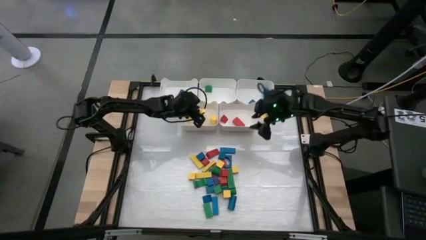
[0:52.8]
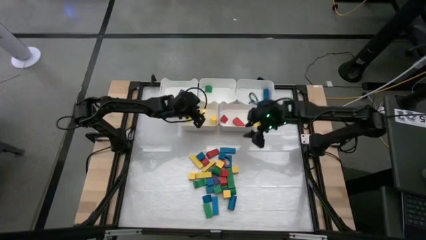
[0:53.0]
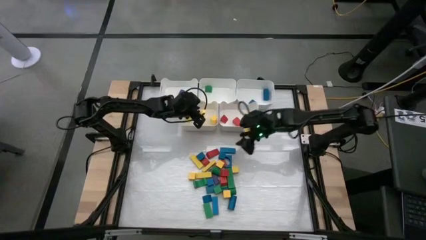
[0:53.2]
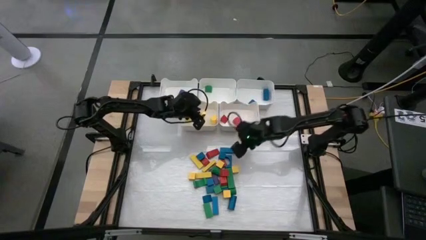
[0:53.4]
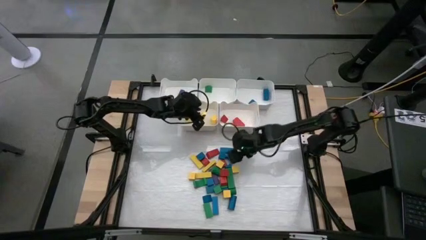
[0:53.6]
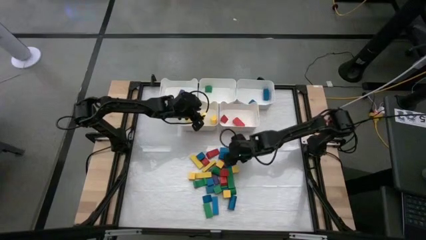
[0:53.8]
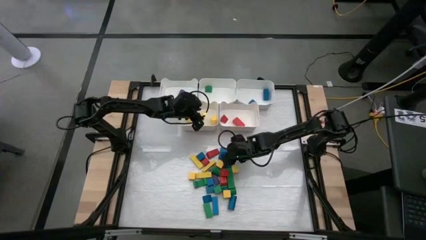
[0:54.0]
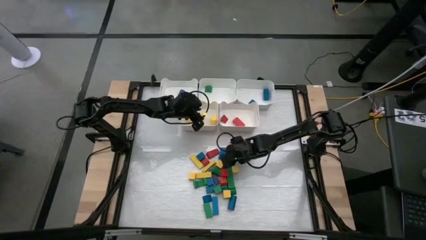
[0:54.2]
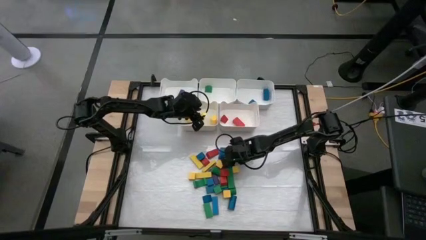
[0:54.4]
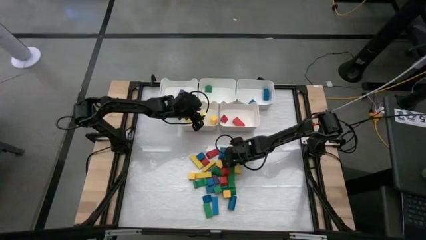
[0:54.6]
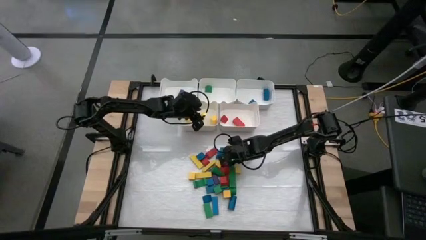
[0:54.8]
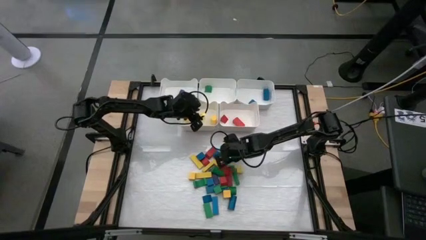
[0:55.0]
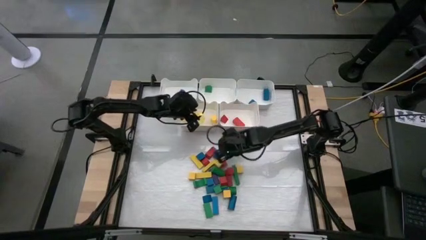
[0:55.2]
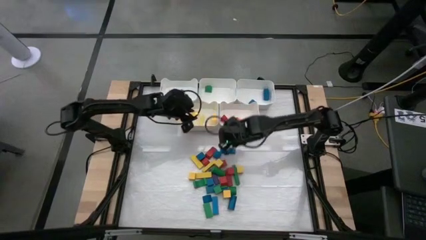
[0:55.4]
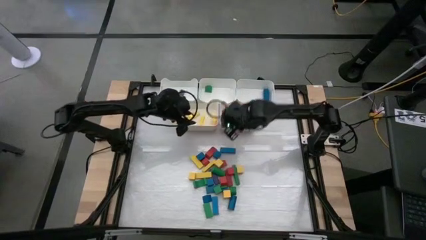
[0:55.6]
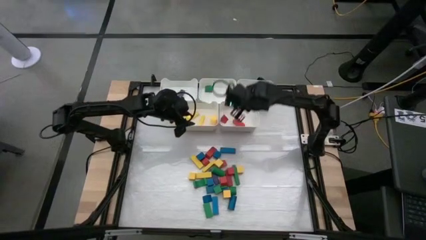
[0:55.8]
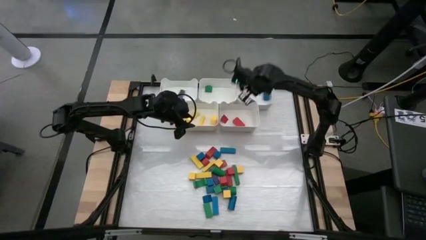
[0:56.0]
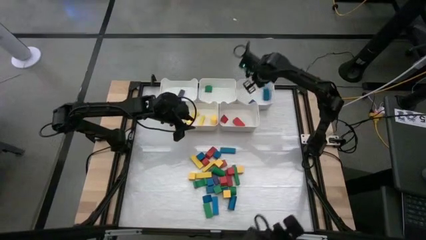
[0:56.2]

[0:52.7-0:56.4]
Task: Sort blocks
Put the blue block into the top right bin

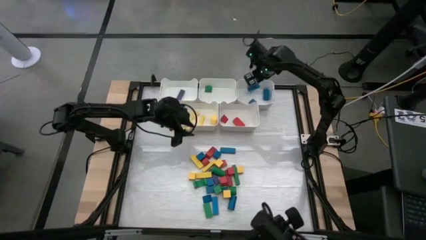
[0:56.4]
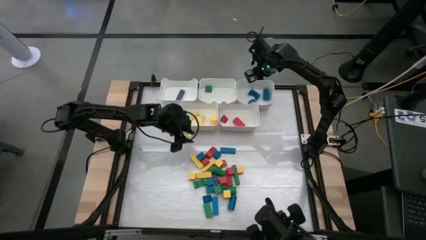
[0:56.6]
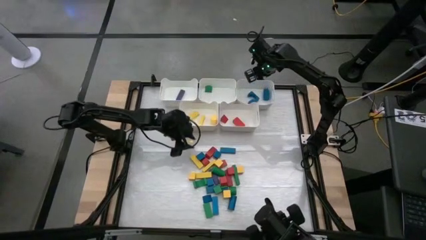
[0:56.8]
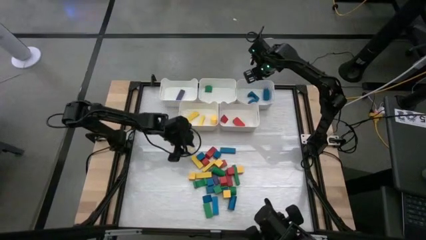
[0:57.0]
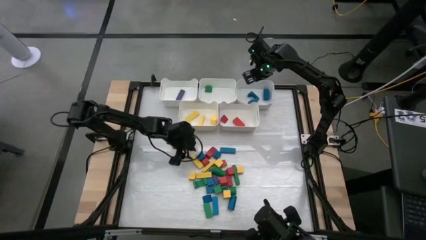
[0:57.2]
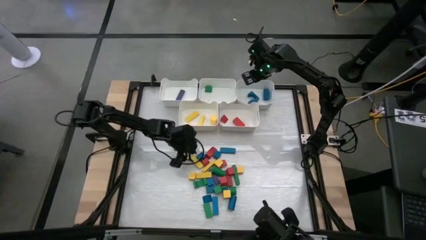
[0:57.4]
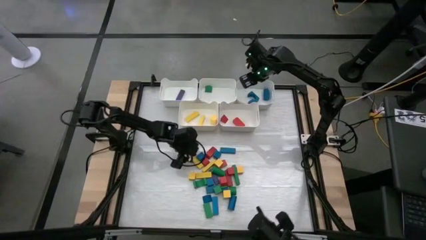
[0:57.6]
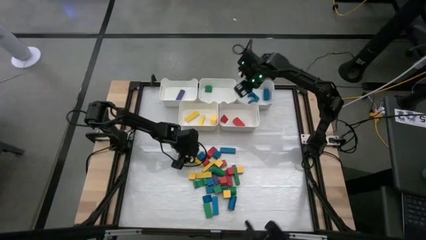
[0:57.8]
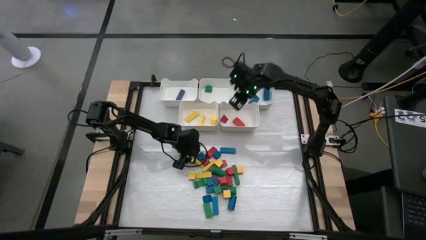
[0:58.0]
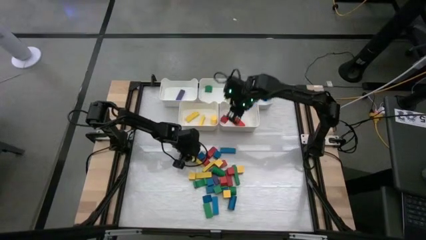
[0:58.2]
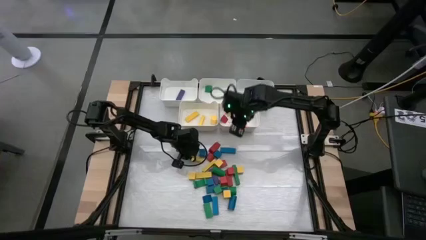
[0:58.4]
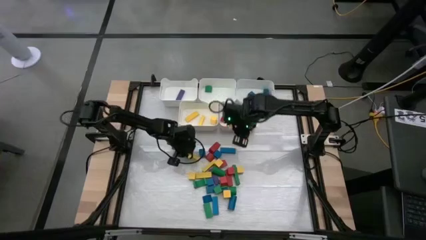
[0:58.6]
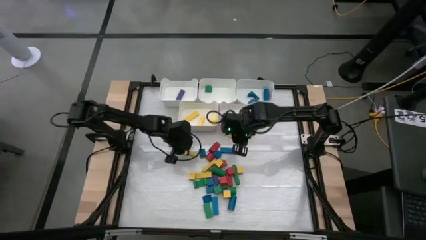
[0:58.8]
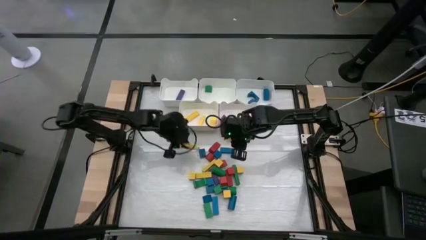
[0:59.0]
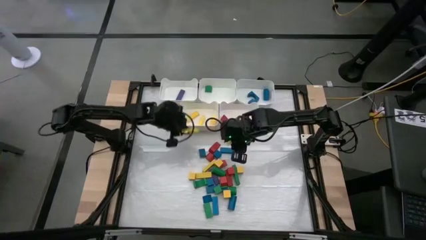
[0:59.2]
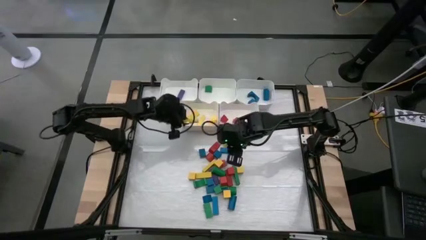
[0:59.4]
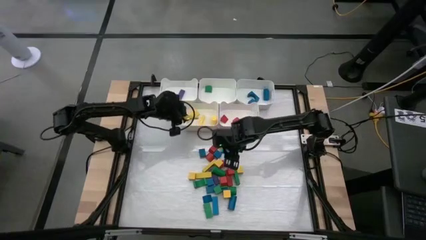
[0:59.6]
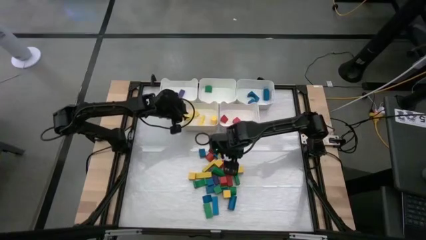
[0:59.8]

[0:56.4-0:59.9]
Put the yellow block into the bottom left bin

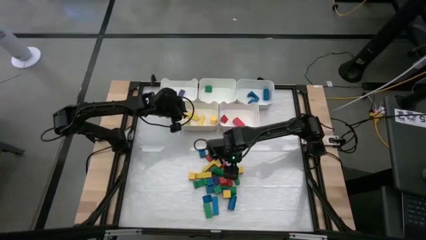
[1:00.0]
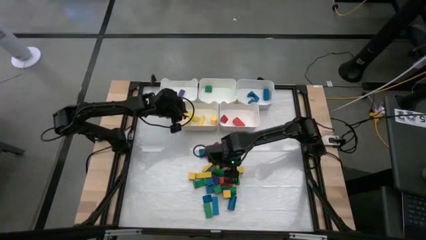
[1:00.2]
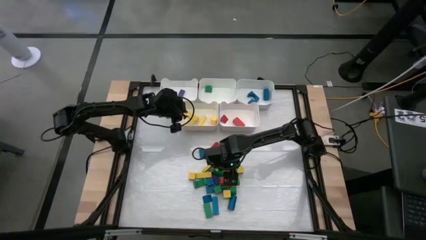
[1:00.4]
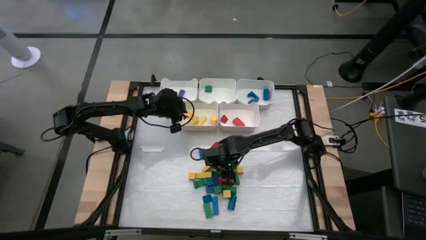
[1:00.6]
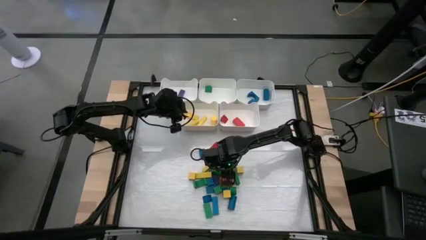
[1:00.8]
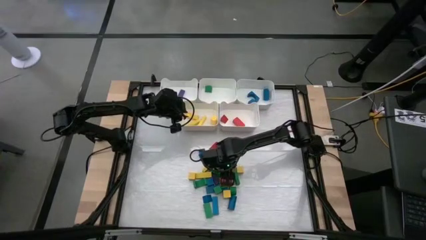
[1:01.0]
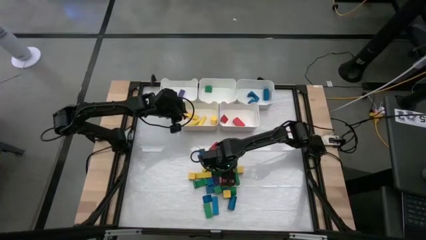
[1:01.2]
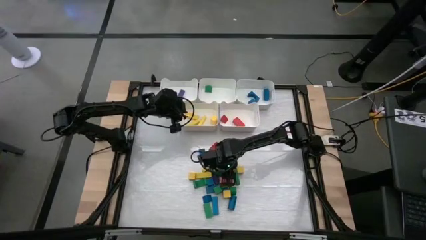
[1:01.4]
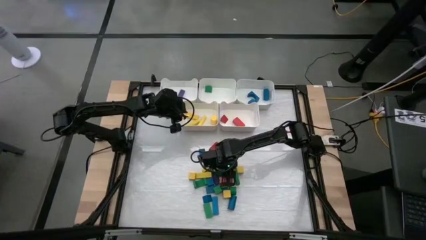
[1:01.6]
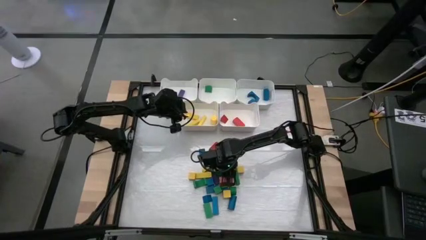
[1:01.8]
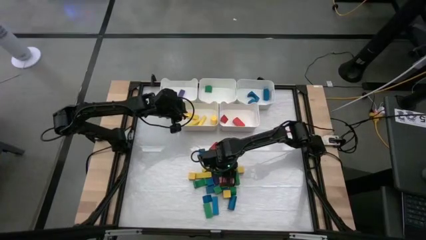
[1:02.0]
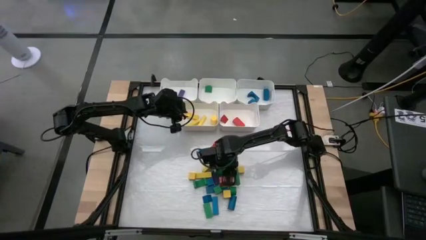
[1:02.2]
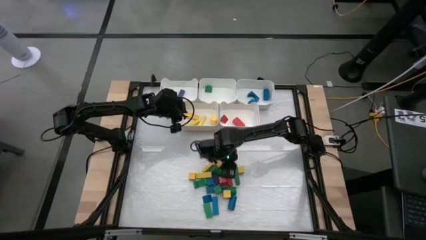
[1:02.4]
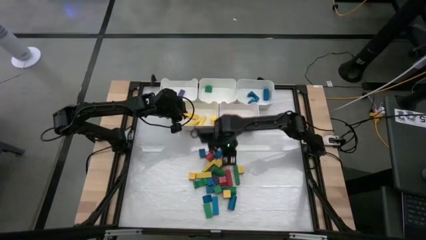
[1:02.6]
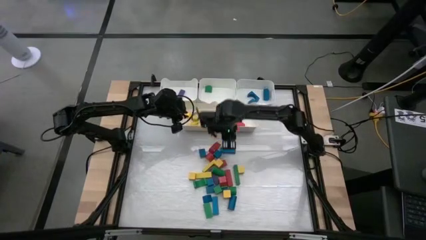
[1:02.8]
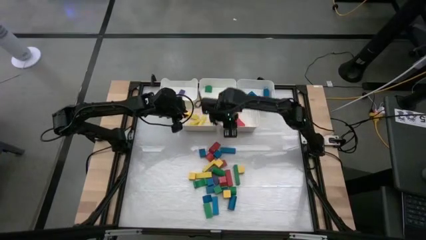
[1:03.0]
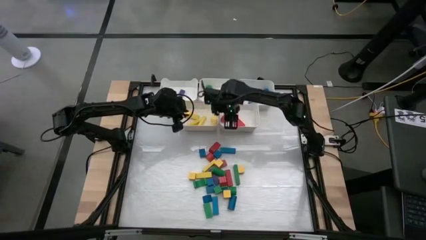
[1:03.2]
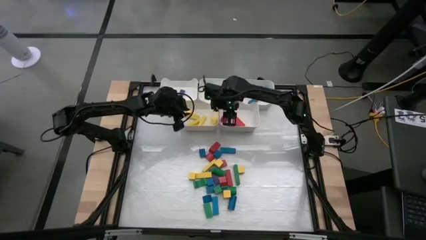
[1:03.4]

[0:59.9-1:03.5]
Put the red block into the bottom right bin

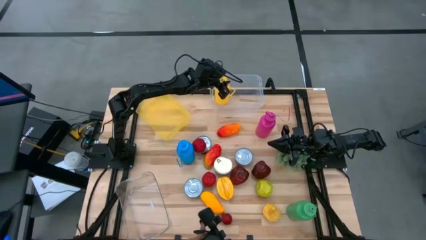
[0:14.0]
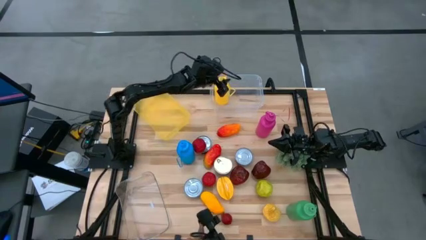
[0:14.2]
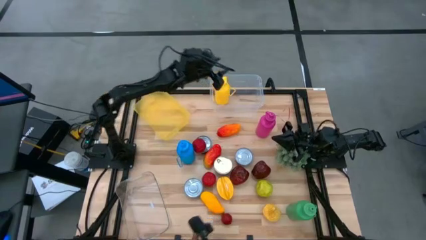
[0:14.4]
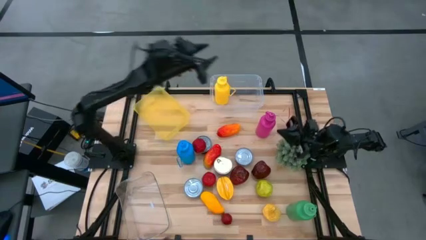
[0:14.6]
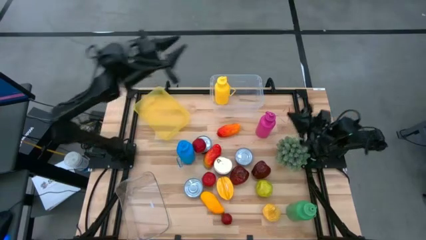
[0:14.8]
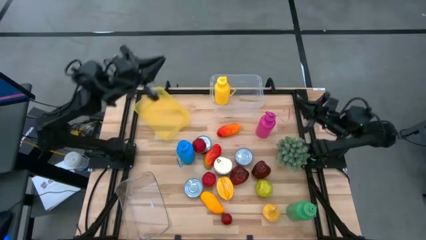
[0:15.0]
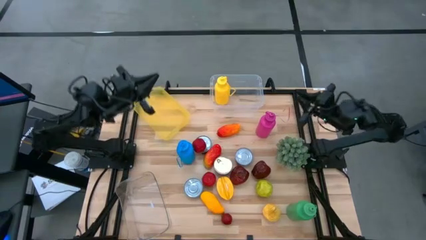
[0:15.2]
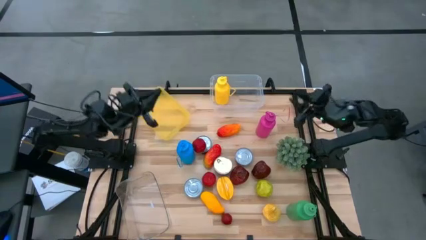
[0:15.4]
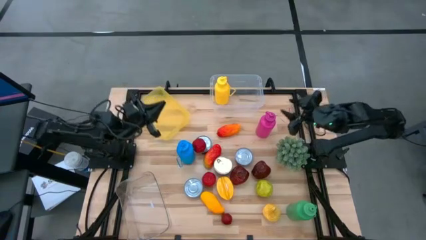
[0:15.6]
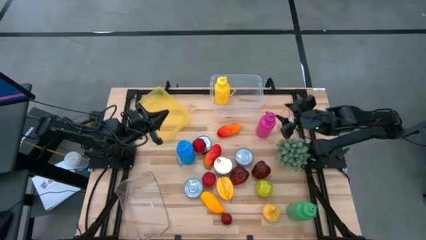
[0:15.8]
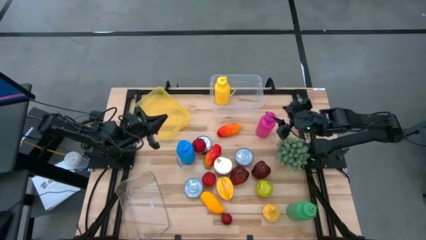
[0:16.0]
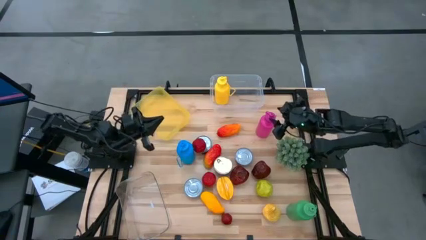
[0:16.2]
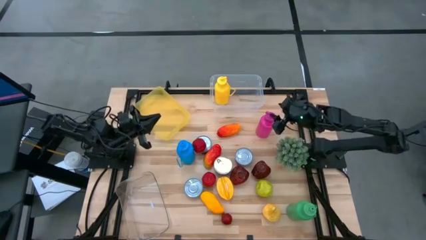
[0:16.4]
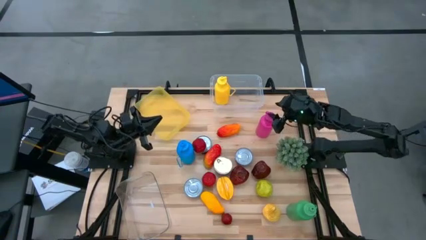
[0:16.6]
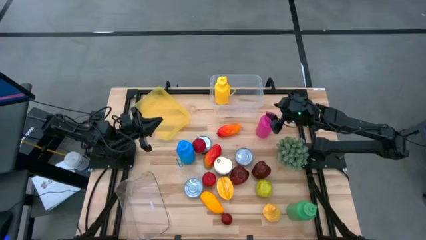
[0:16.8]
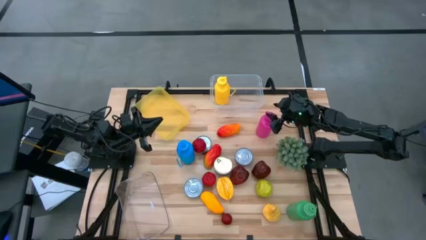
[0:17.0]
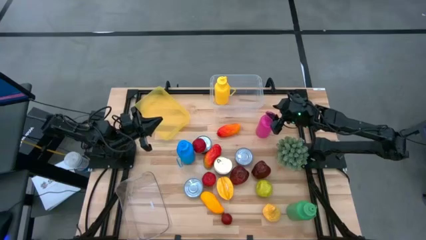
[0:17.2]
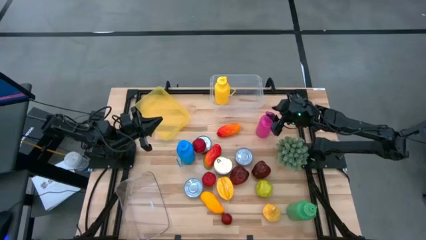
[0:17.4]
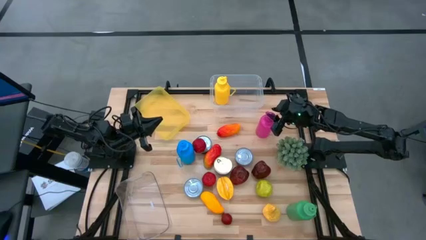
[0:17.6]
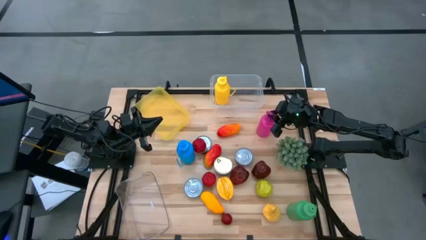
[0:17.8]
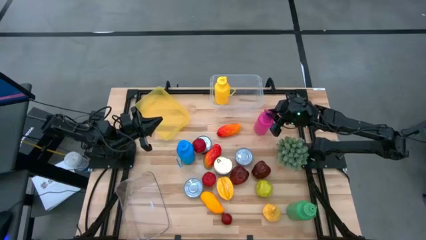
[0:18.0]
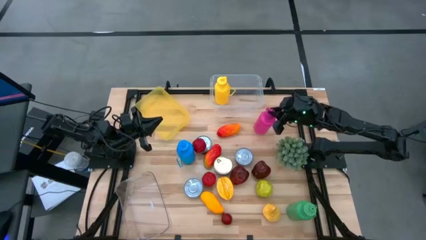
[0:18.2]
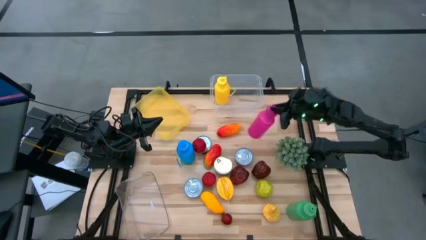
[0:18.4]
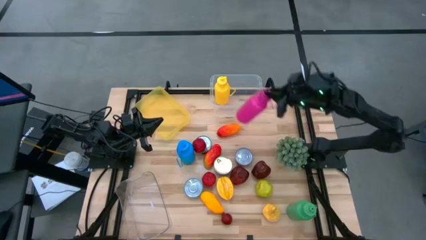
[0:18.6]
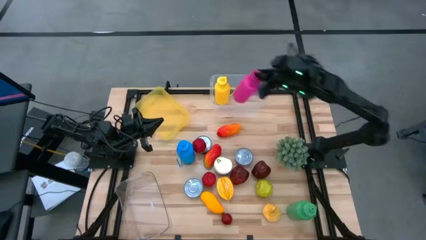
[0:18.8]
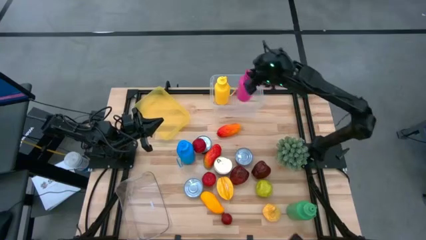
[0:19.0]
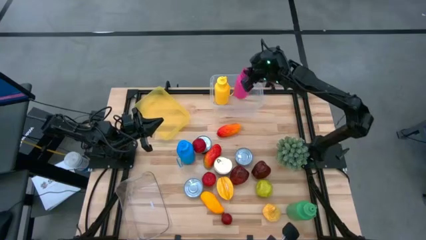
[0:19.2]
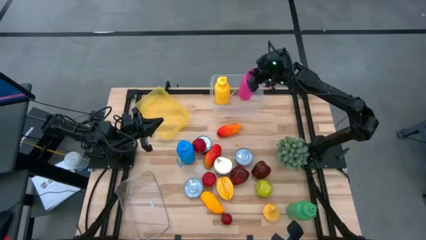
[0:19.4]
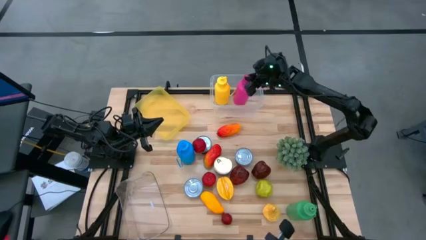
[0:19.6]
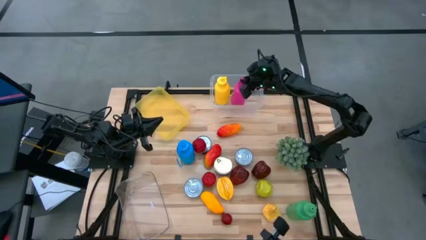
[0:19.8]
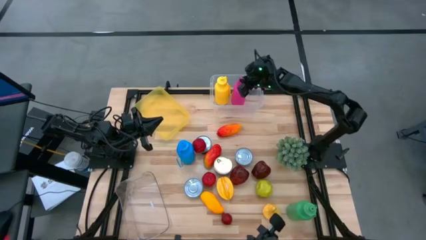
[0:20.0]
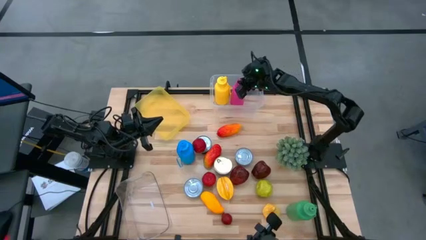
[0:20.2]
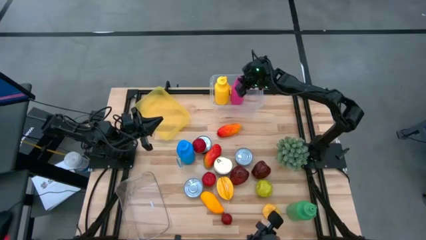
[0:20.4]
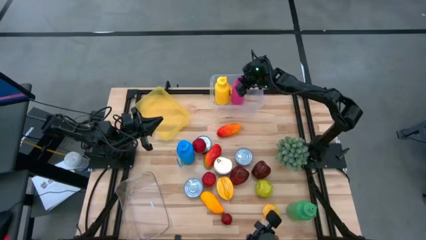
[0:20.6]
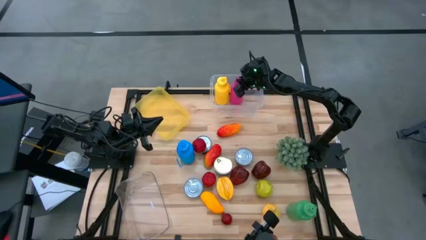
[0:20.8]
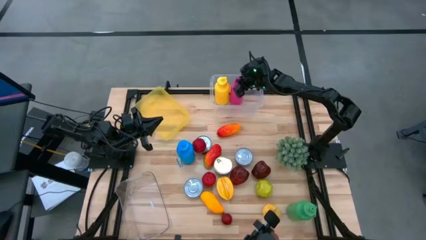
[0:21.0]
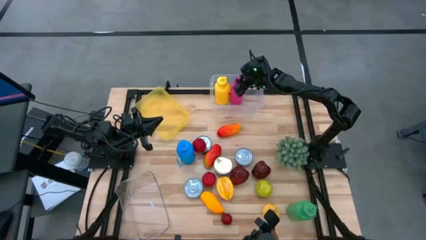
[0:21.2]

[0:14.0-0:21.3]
Task: Pick & Place Food Item
Put the pink water bottle into the white transparent bin
